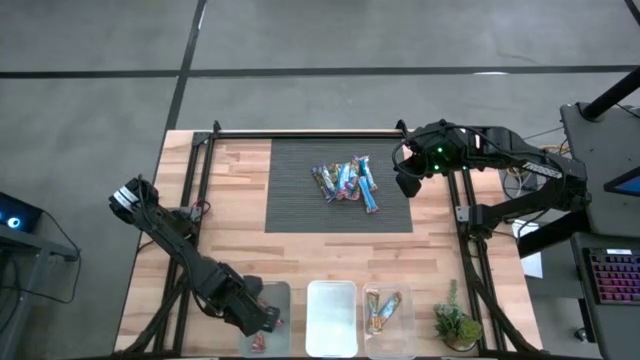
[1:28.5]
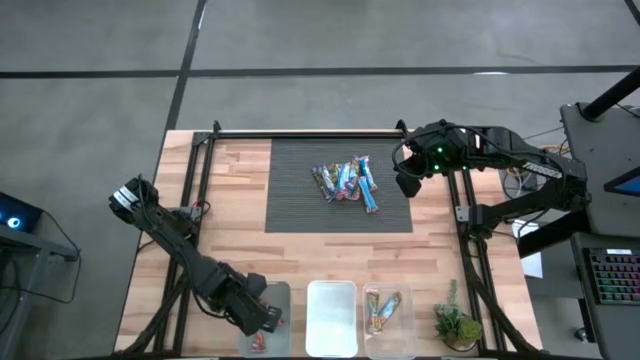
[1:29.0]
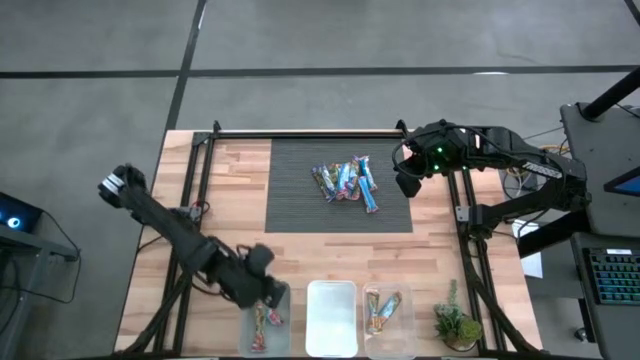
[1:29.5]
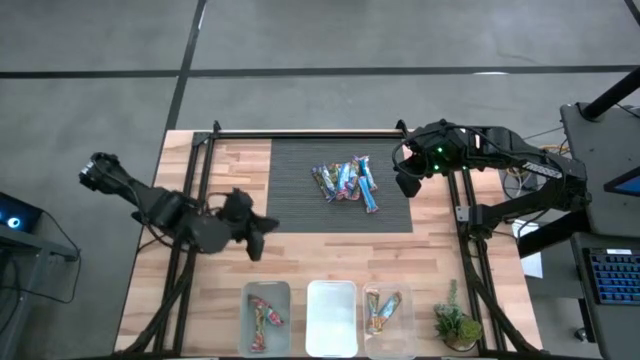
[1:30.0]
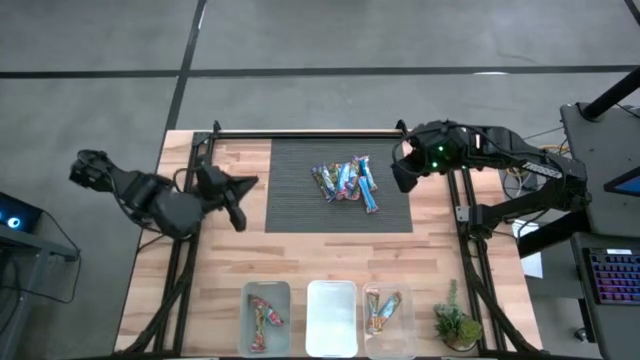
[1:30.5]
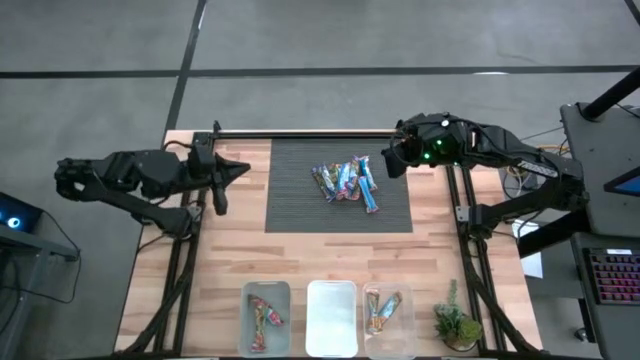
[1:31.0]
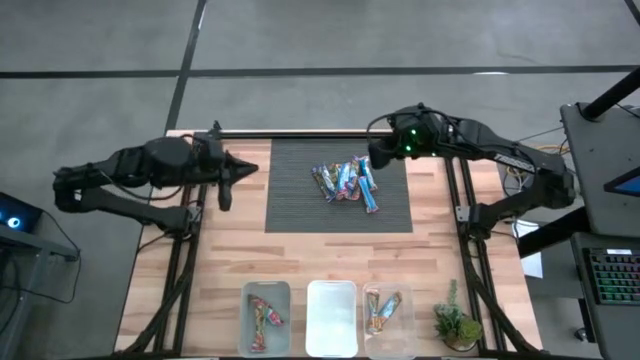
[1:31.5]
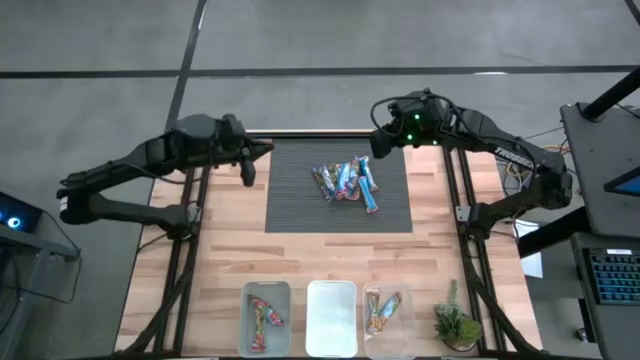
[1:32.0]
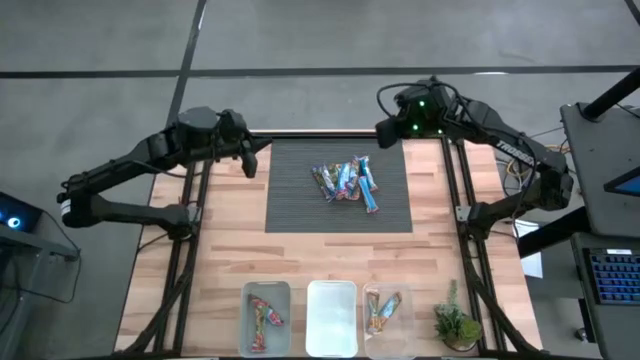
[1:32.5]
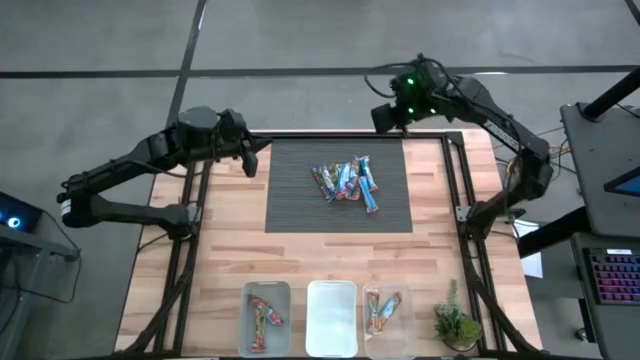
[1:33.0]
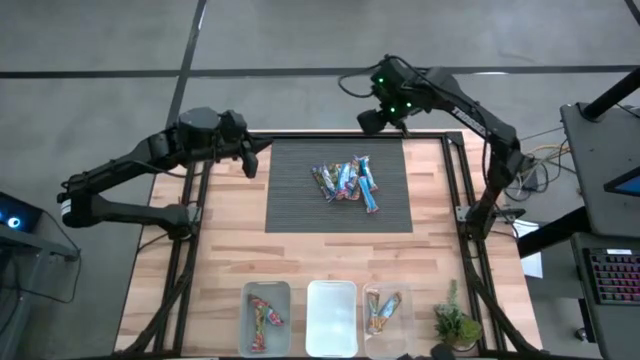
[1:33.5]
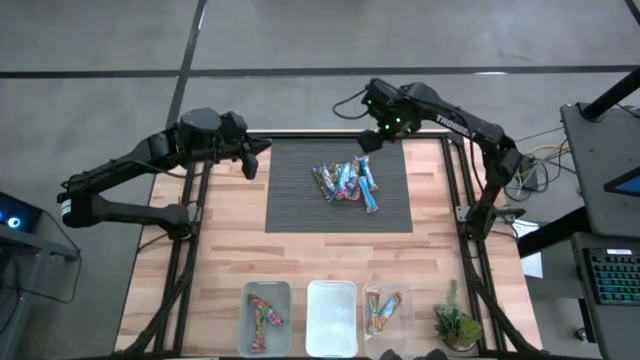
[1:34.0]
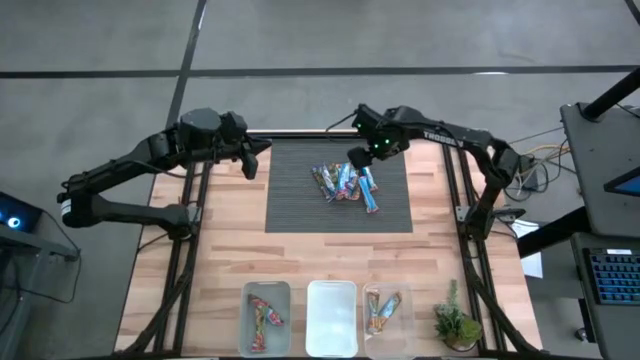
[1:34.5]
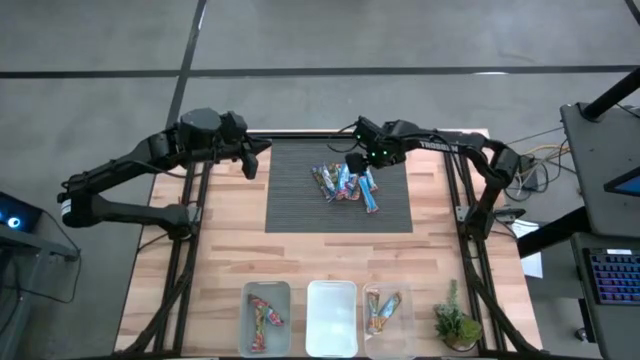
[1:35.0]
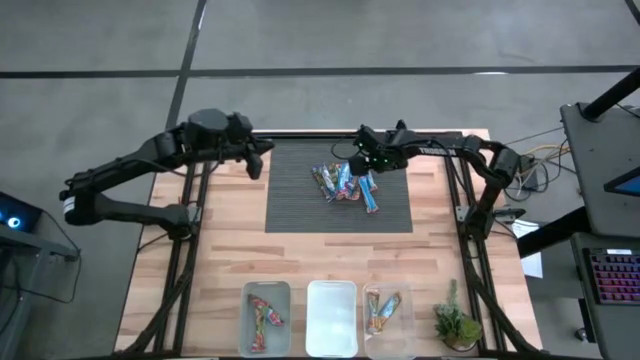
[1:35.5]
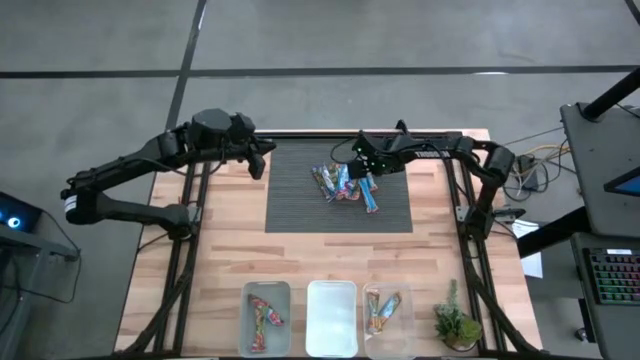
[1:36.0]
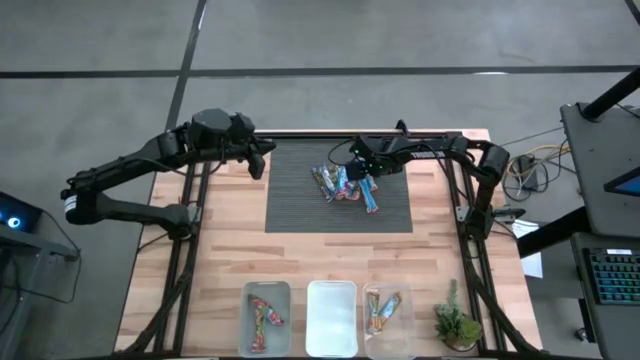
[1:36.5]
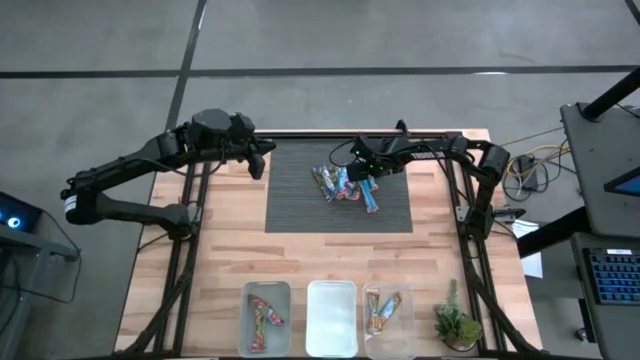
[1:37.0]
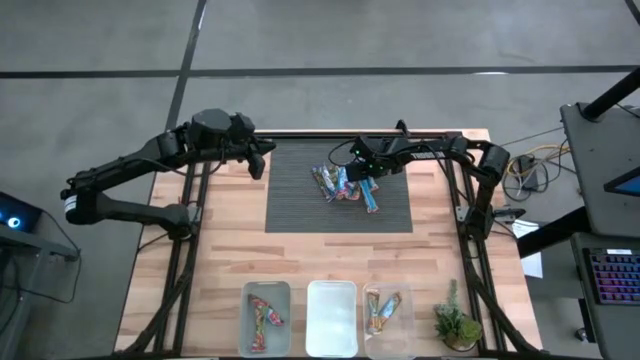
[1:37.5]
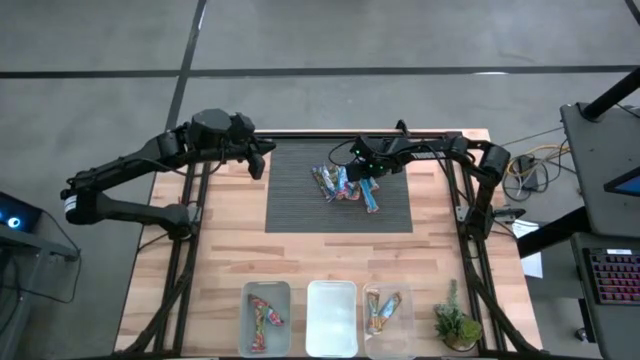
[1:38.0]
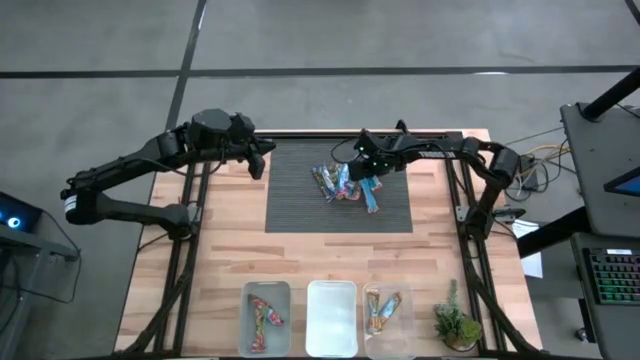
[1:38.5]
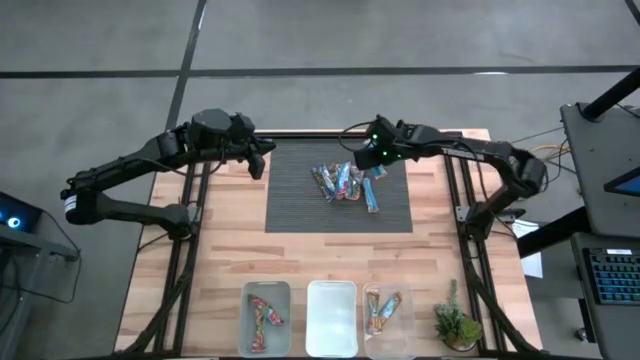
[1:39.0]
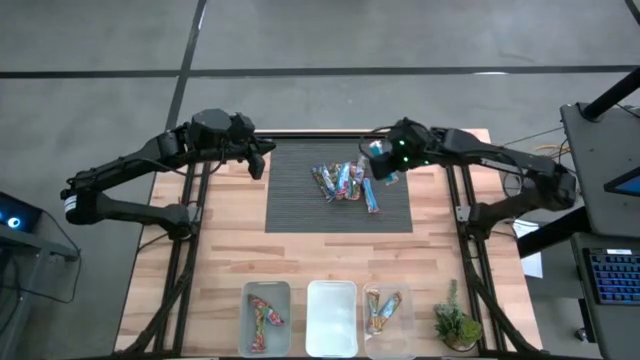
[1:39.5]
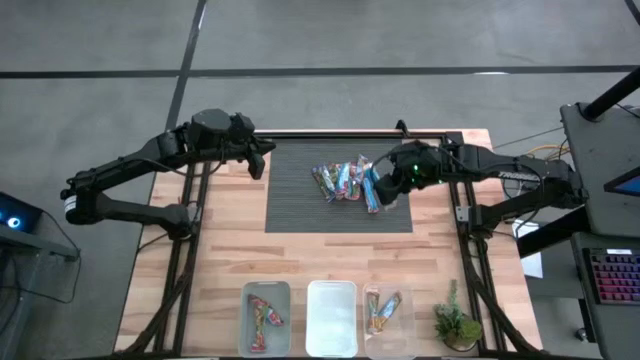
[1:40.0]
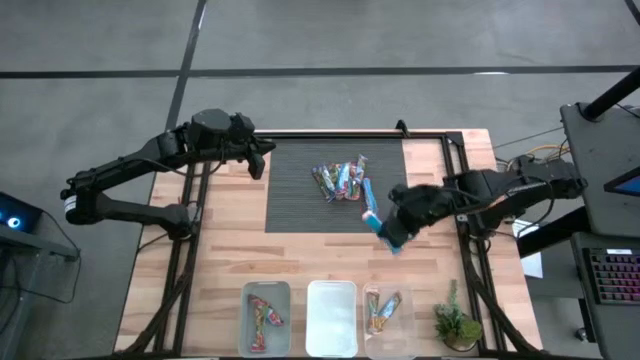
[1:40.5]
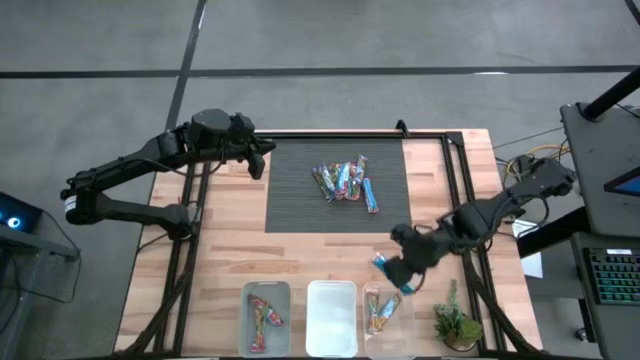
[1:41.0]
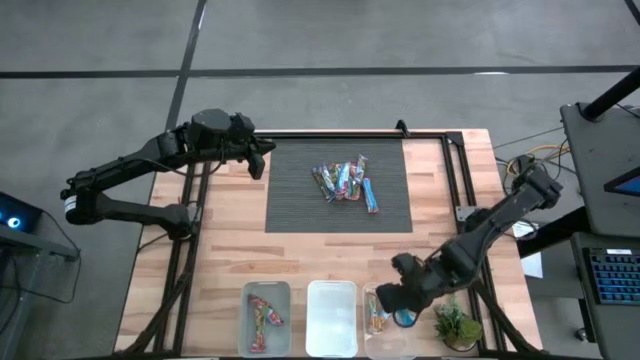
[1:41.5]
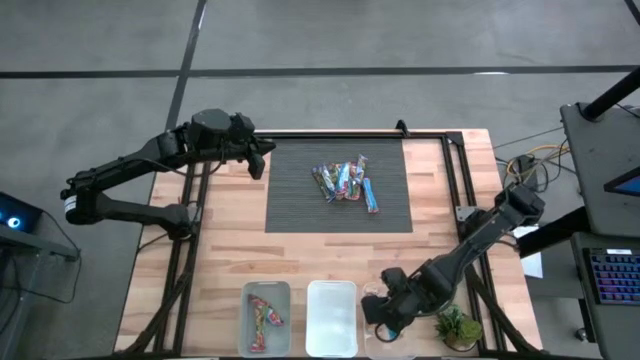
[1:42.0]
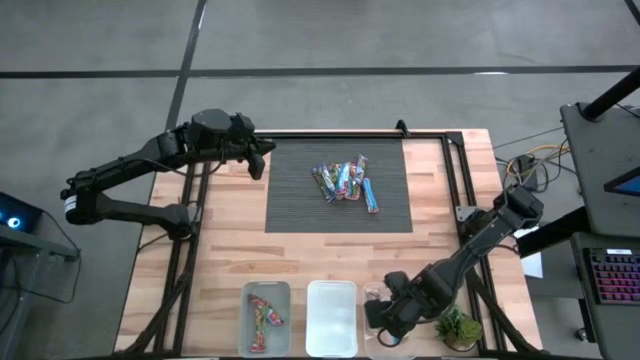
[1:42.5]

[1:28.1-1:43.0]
Task: Pick and place Granola Bars by type
Put the right yellow granola bar into the transparent bin

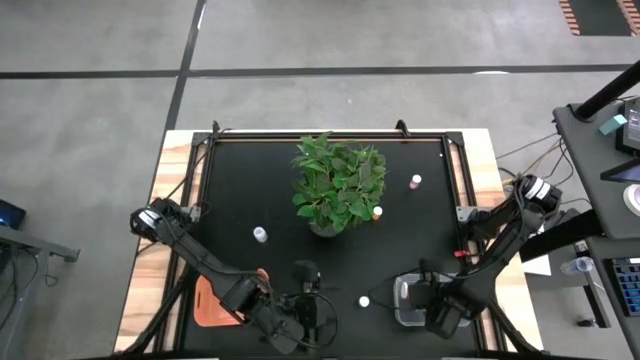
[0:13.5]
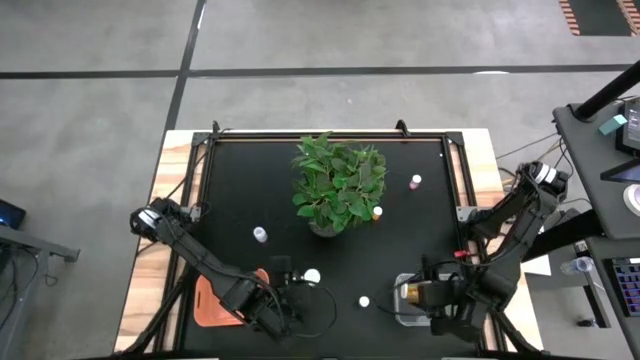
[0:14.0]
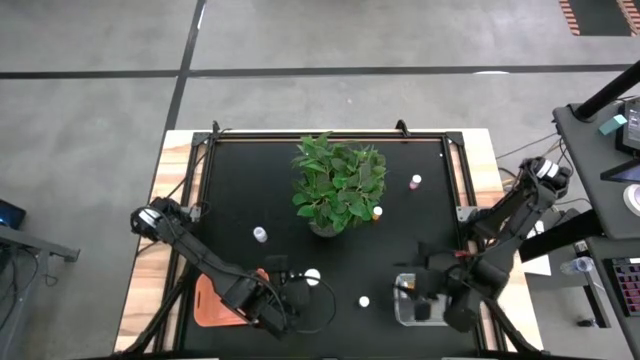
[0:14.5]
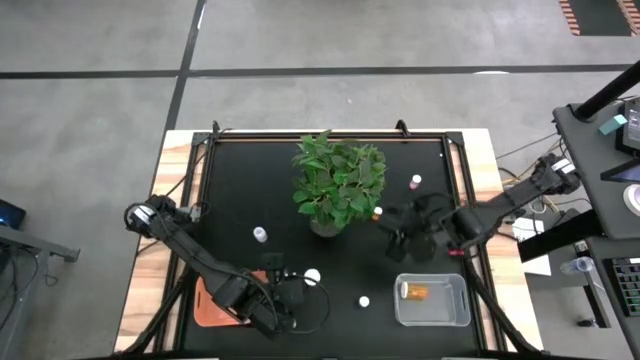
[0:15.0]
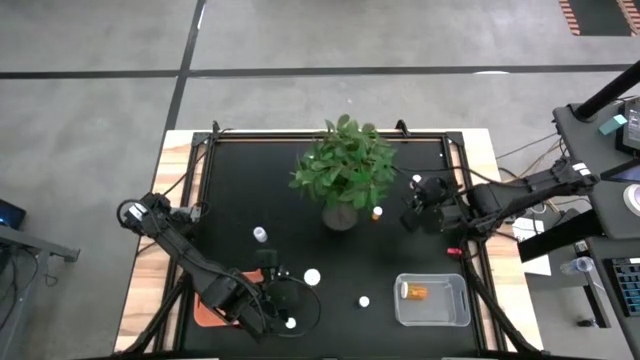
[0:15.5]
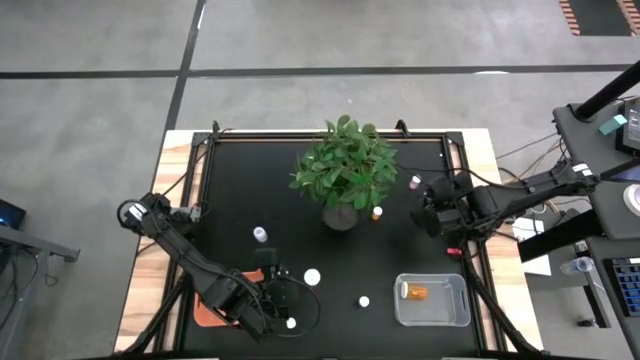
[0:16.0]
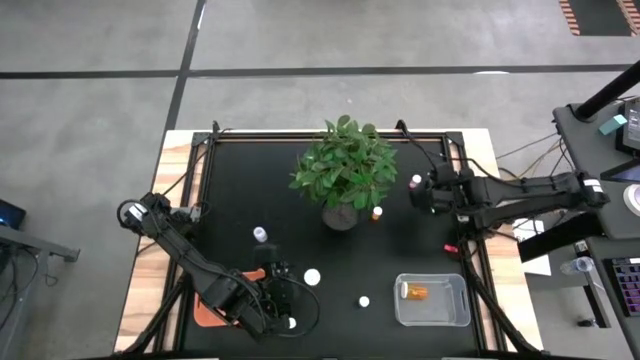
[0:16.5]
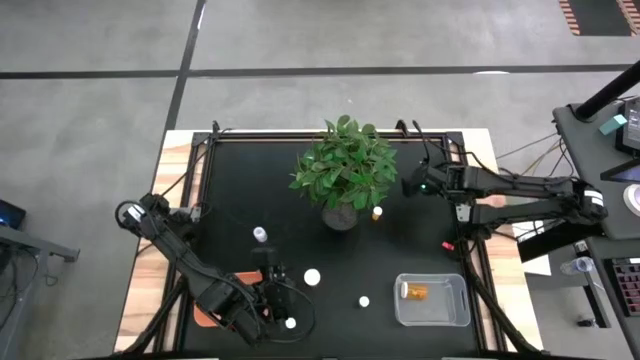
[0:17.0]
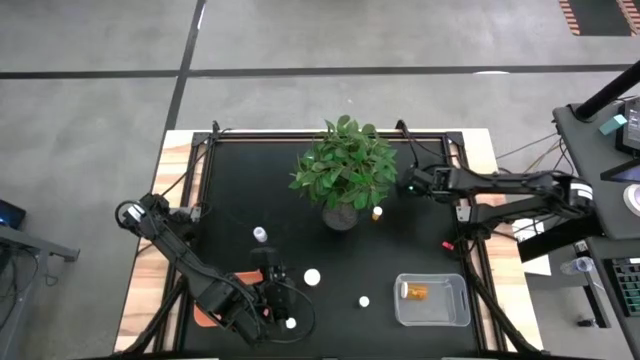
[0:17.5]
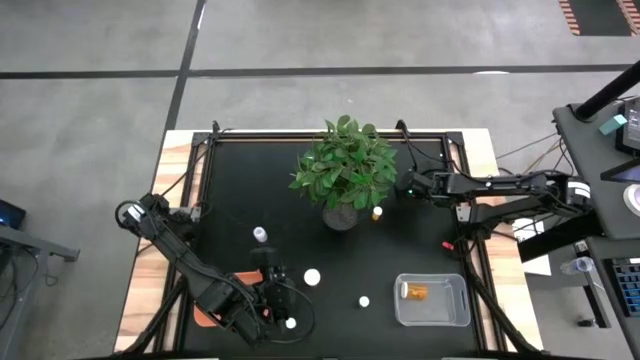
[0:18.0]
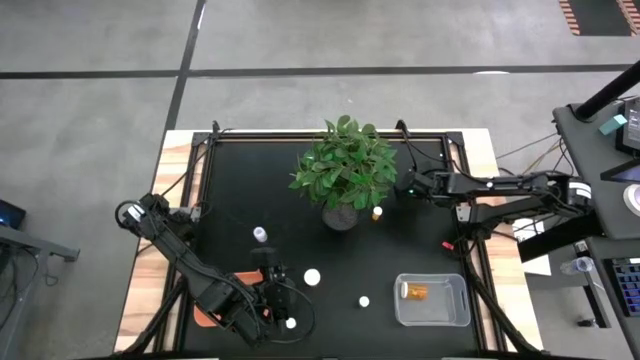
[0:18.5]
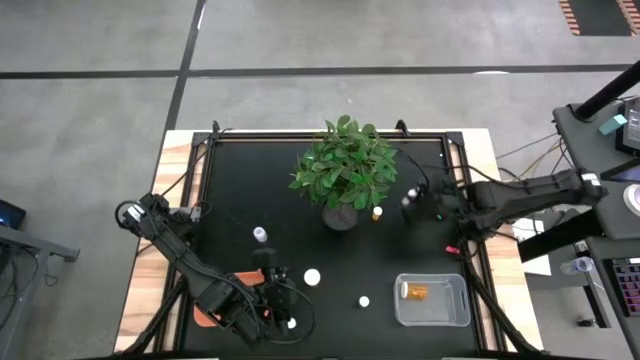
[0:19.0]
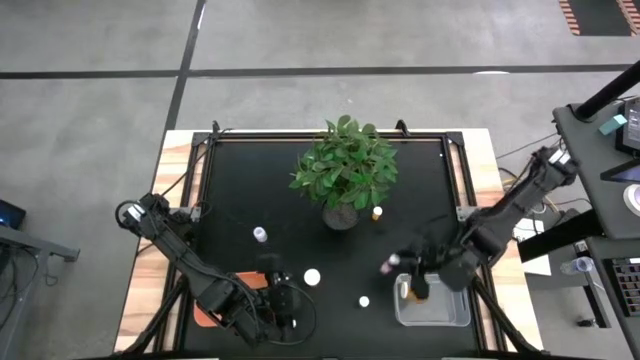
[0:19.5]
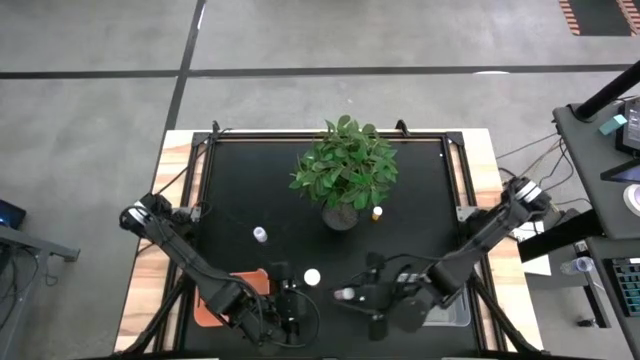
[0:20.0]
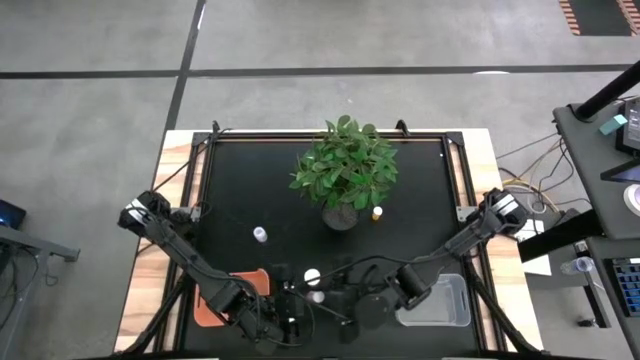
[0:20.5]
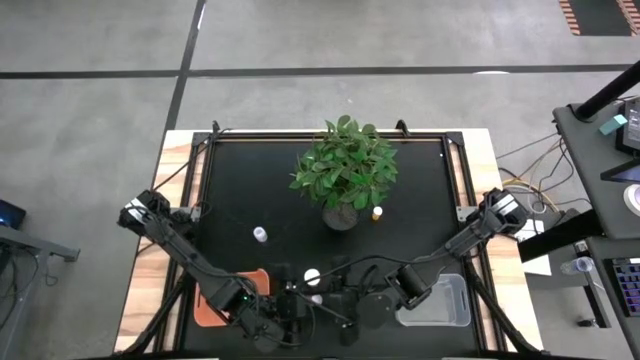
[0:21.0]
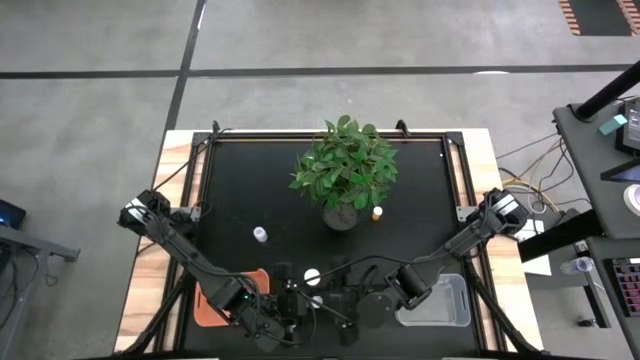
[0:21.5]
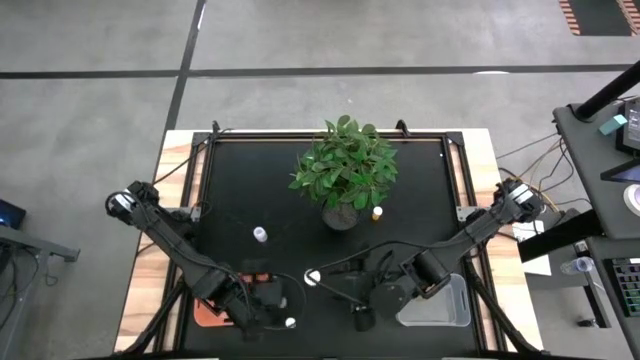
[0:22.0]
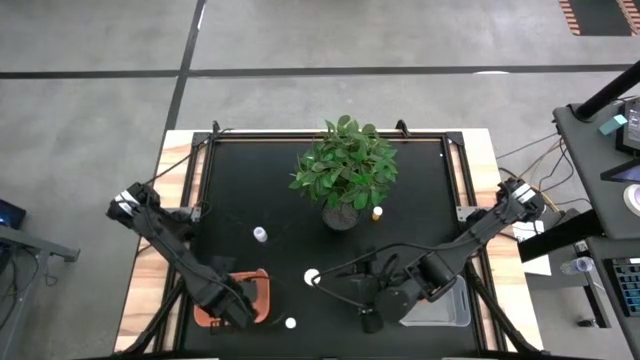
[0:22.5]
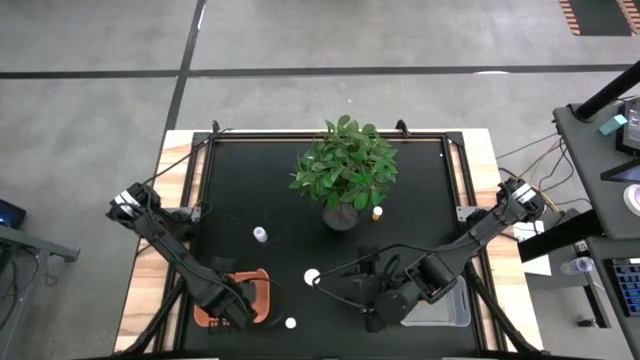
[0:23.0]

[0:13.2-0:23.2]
Task: Pick and place medicine bottles into bin by pill shape (circle, oval)
Put the pink tablet bottle into the orange bin
